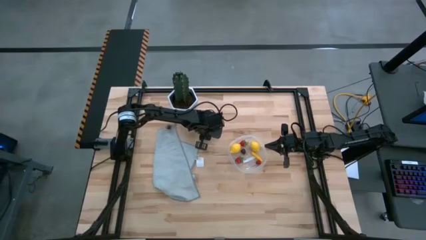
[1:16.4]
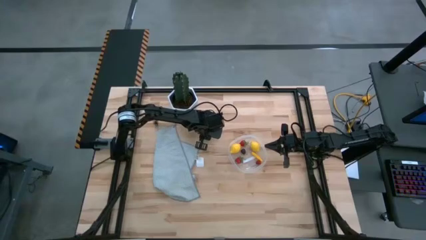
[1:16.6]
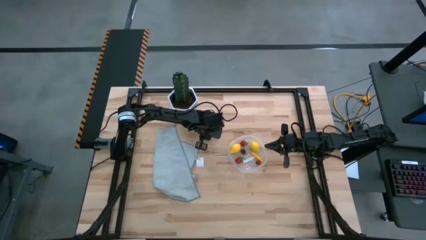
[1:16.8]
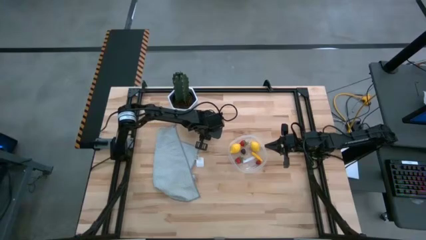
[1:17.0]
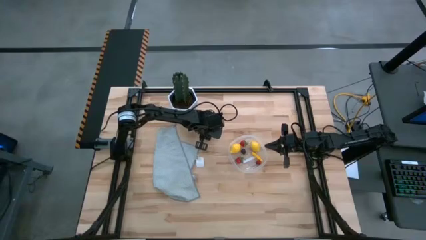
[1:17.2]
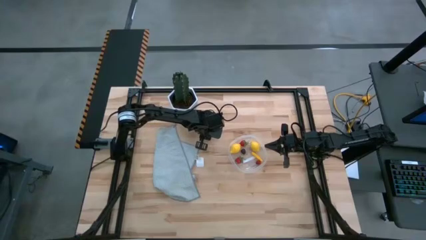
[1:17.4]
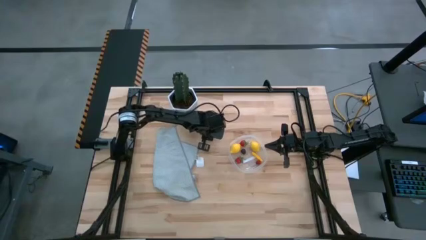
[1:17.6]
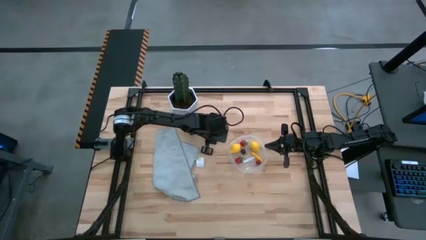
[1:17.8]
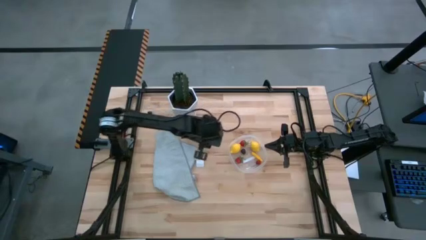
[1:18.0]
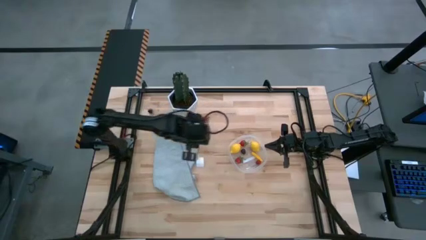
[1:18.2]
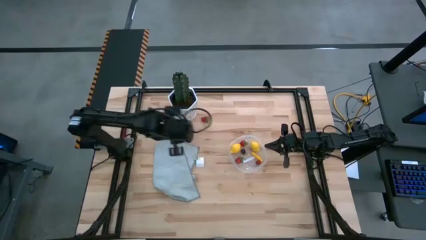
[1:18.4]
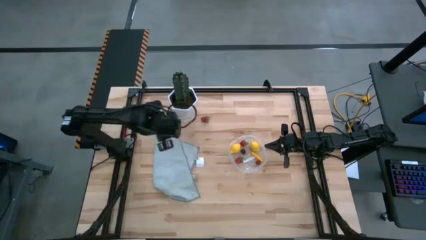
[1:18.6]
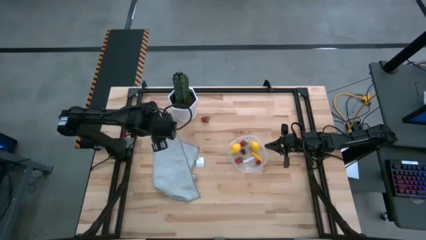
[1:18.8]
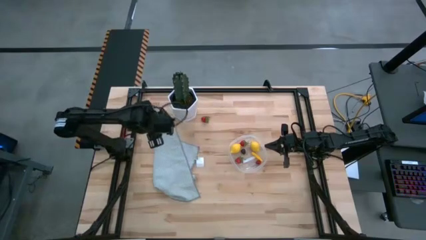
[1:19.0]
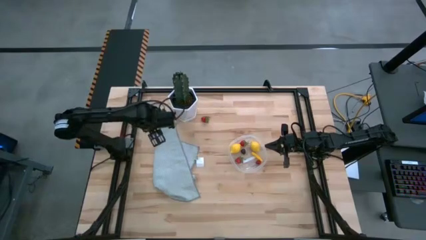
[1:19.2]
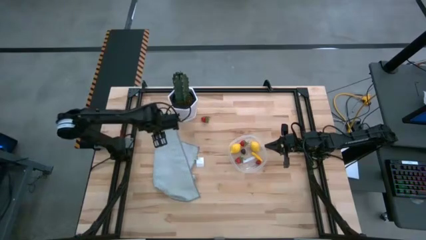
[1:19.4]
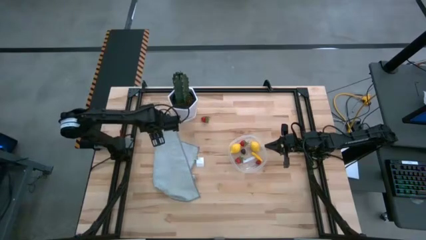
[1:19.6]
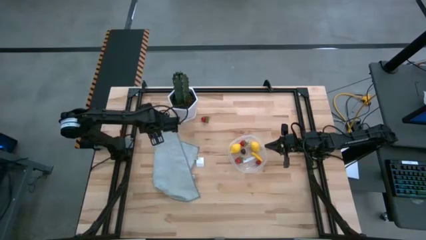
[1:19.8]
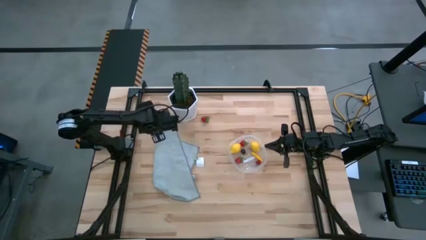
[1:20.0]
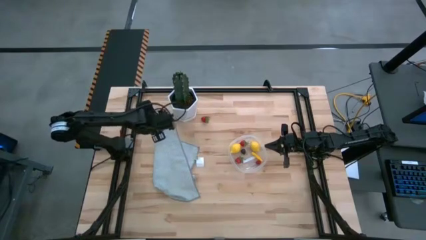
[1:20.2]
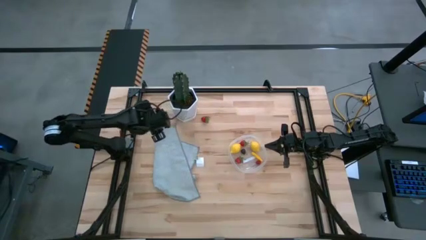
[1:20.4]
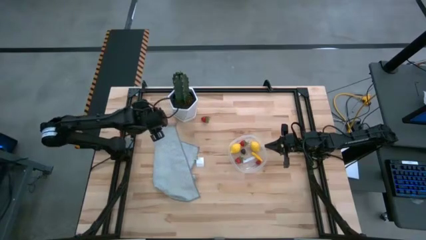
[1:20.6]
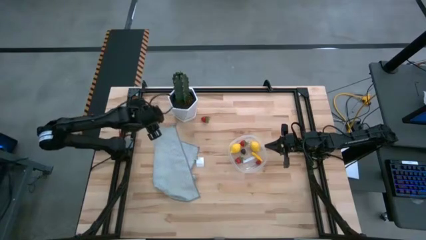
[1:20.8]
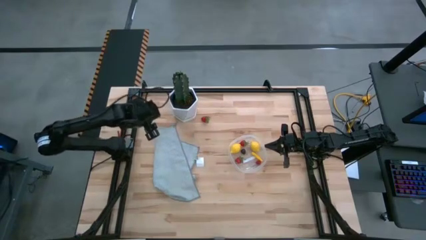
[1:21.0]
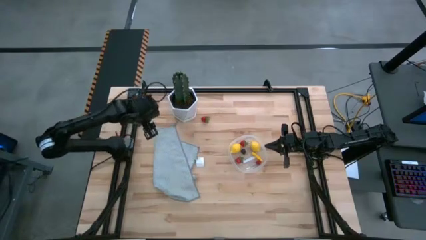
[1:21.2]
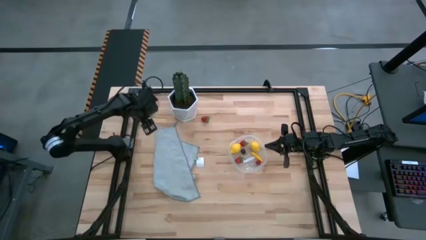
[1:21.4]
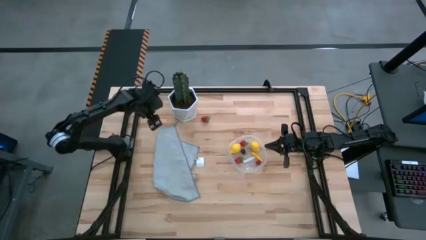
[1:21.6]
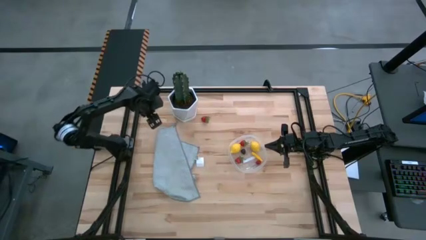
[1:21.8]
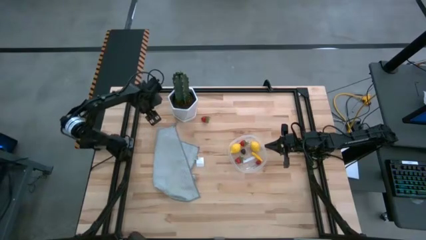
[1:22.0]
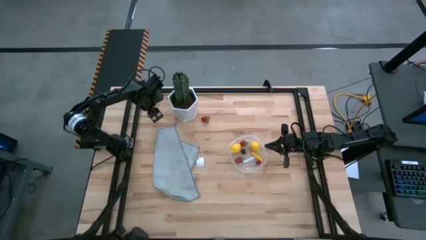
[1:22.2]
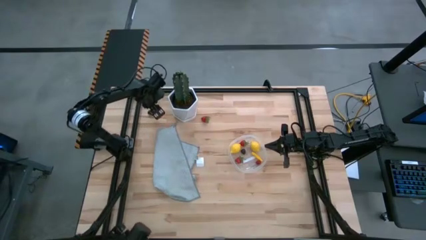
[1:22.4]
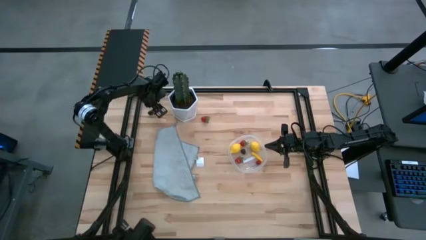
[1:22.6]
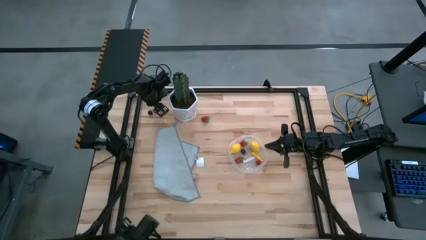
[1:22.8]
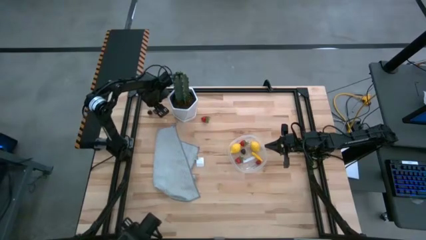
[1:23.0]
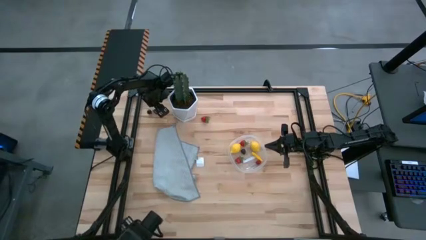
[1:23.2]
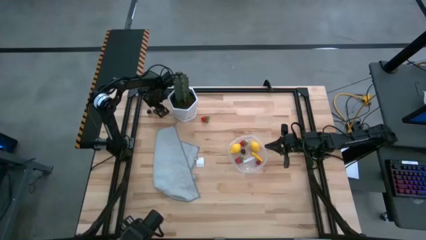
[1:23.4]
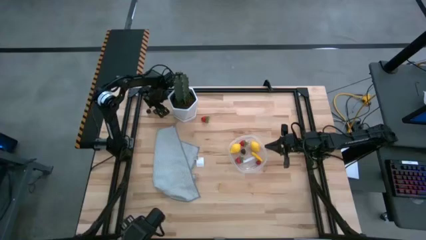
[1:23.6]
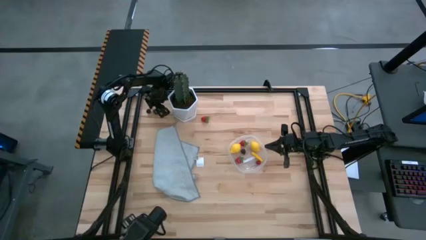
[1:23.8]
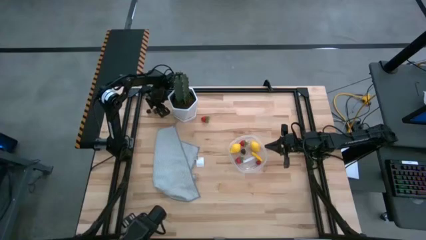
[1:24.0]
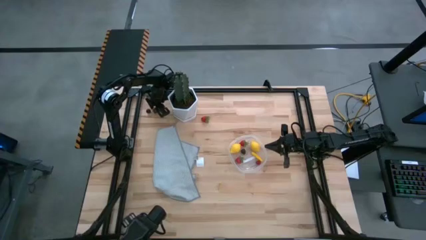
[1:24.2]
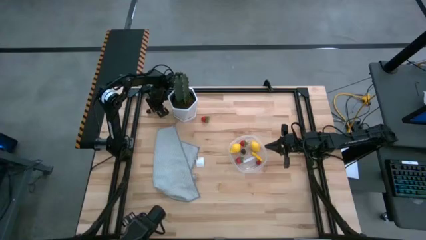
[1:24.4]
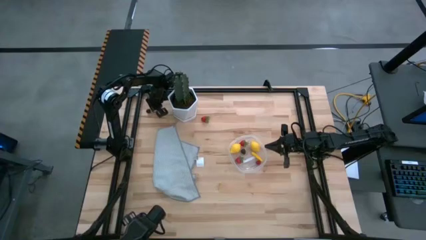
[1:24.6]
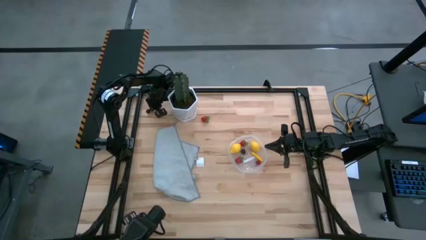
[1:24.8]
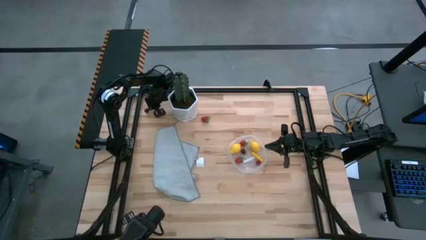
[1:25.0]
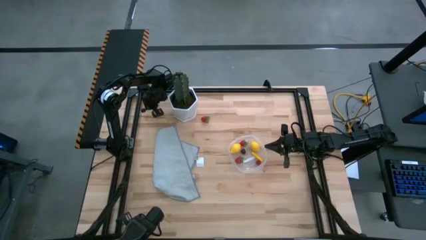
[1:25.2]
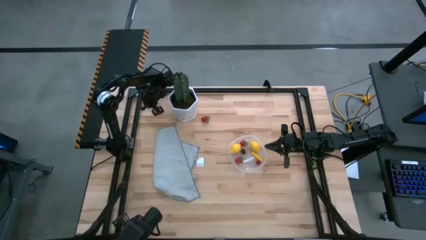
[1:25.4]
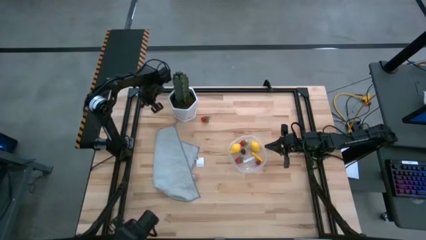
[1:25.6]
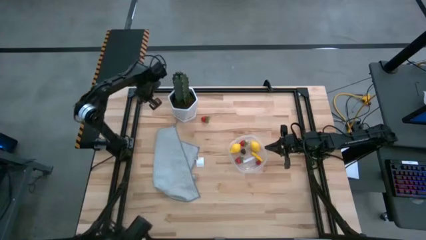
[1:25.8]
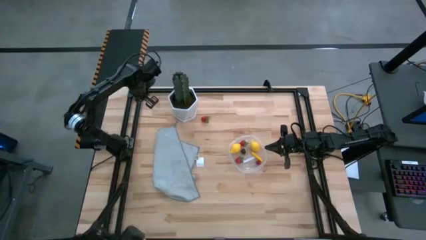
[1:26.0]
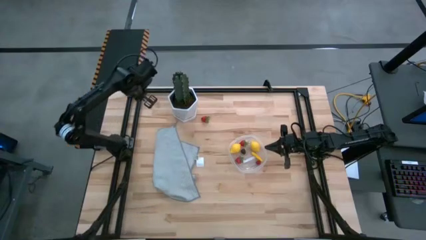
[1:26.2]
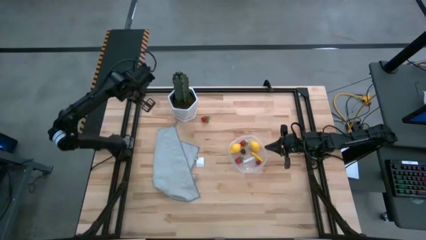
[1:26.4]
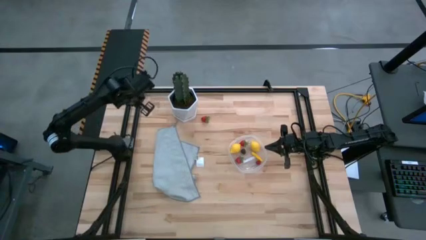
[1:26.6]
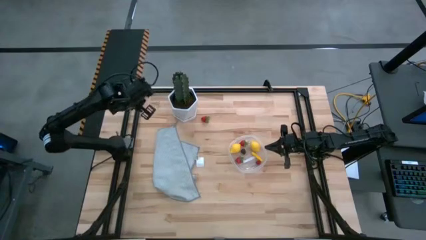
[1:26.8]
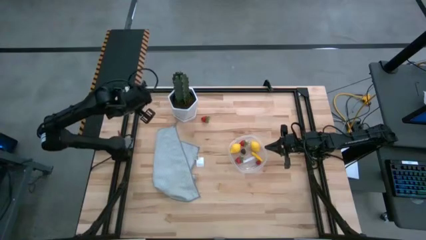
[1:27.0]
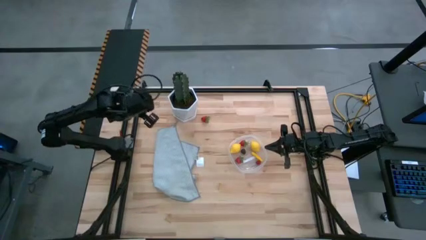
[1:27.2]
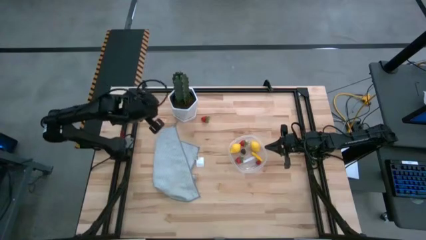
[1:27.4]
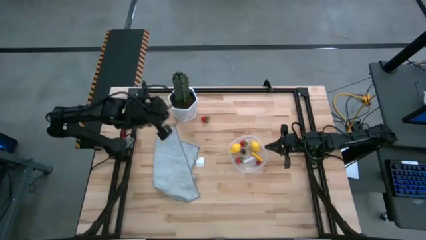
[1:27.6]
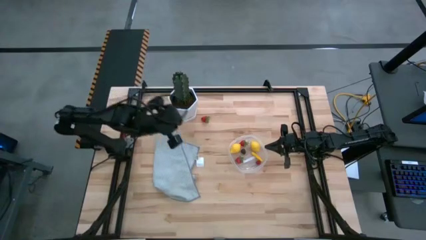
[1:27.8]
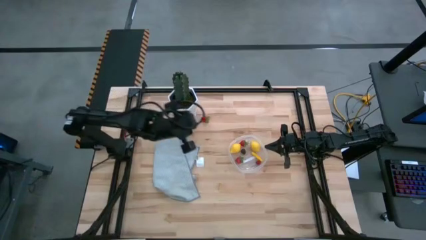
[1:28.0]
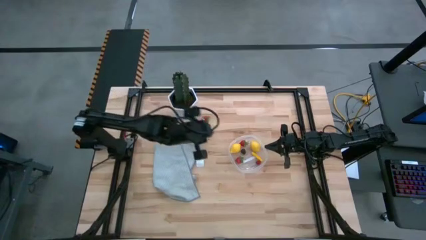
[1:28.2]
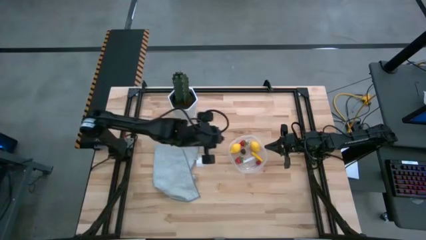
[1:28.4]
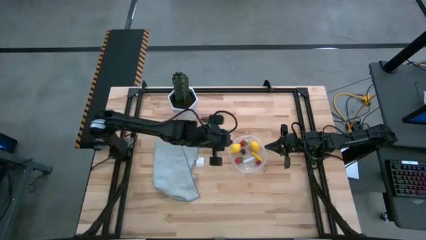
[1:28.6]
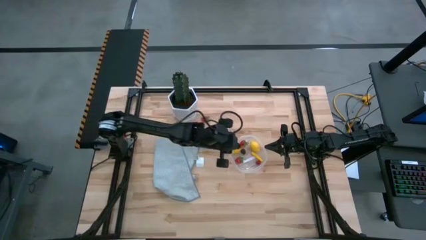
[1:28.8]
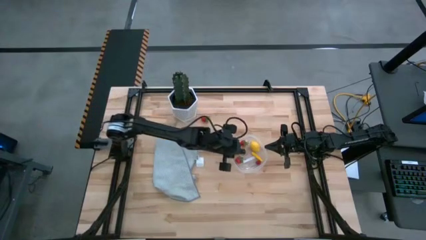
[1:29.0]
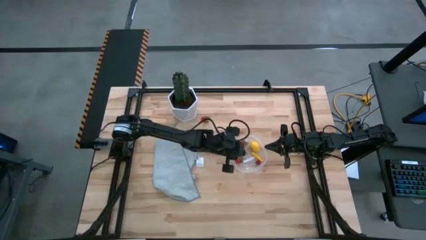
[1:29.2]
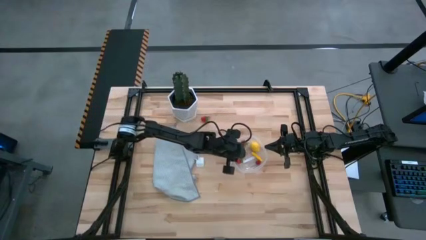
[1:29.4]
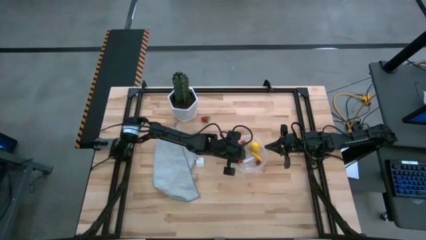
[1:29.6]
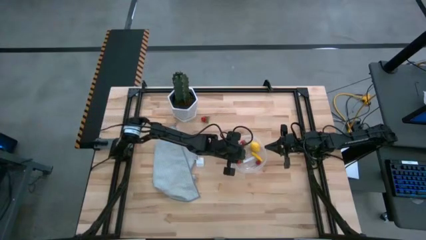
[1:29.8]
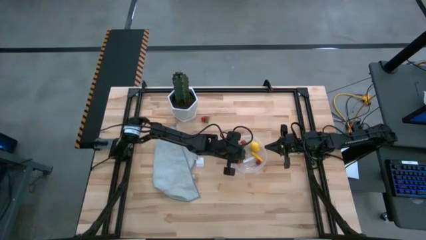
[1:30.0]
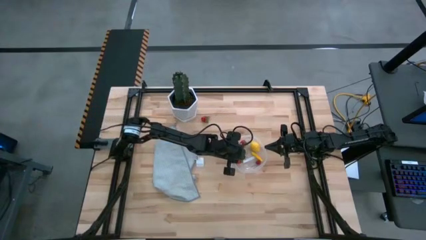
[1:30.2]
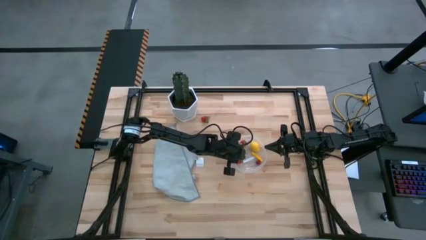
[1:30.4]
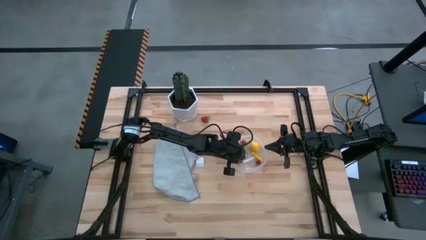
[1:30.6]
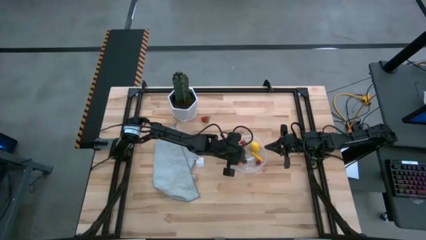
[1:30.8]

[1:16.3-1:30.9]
Task: Pick and placing Produce into tupperware
Put the black cherry into the transparent container

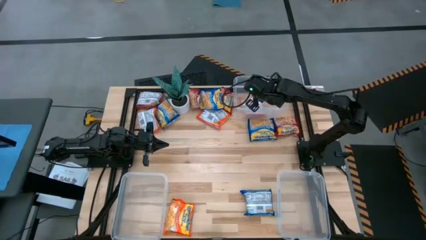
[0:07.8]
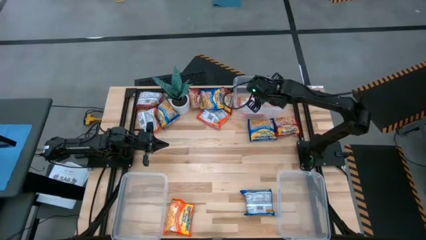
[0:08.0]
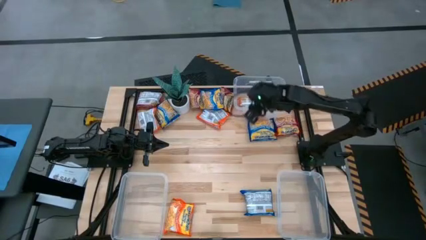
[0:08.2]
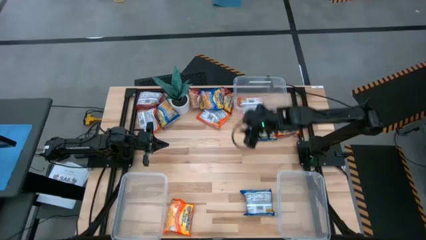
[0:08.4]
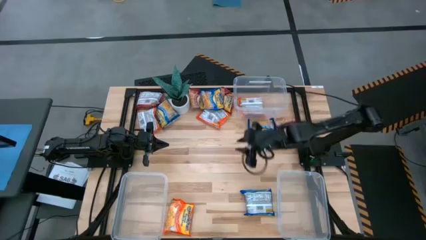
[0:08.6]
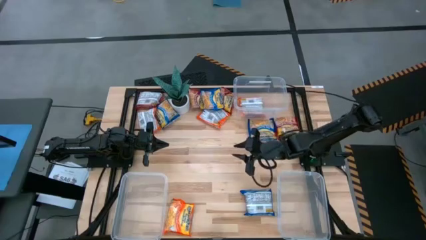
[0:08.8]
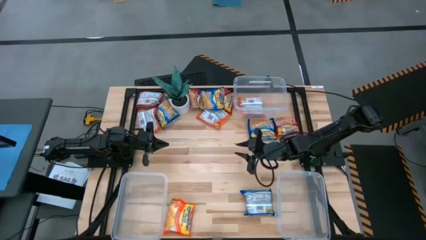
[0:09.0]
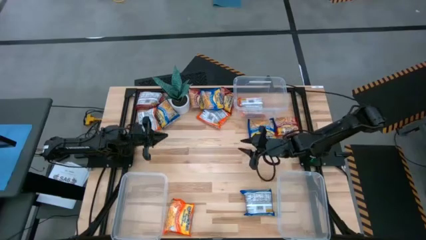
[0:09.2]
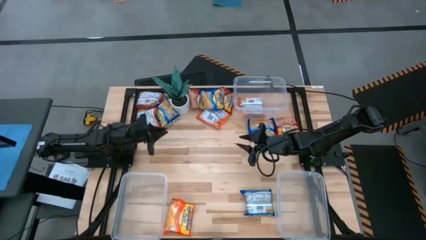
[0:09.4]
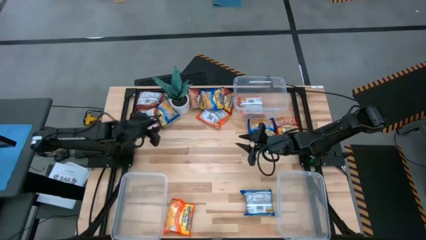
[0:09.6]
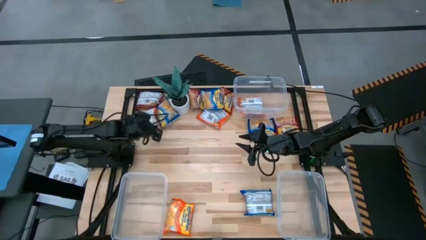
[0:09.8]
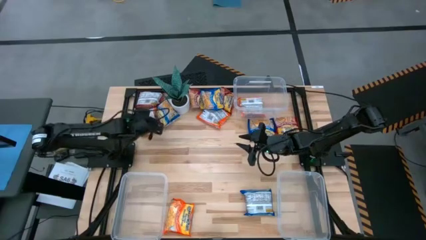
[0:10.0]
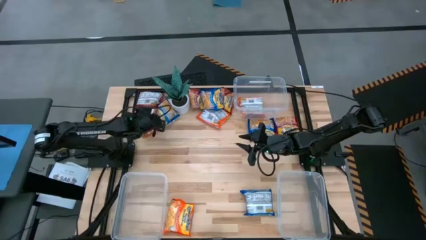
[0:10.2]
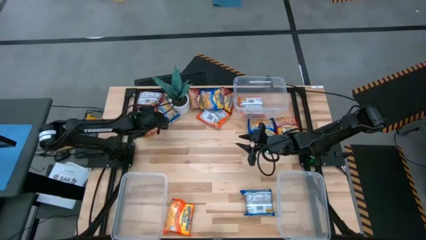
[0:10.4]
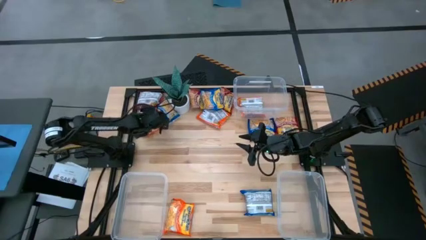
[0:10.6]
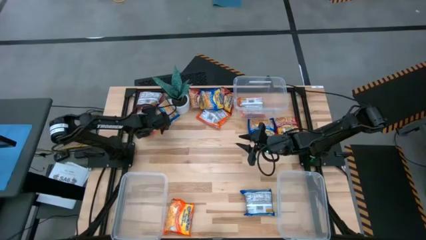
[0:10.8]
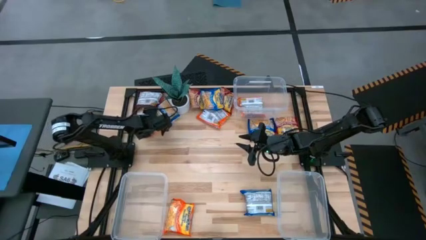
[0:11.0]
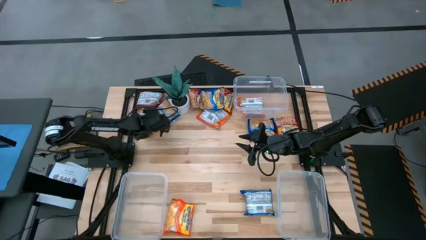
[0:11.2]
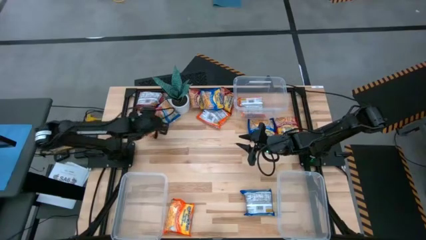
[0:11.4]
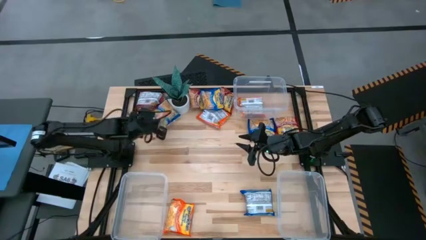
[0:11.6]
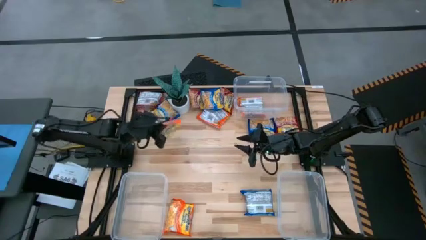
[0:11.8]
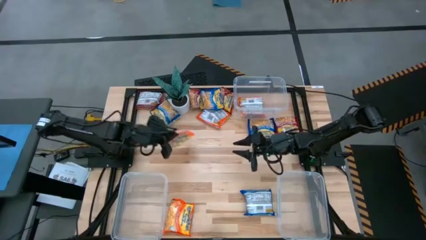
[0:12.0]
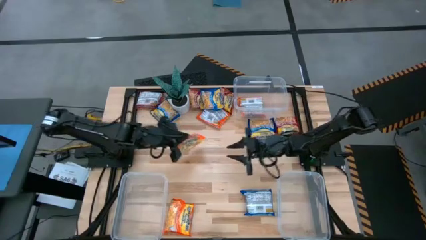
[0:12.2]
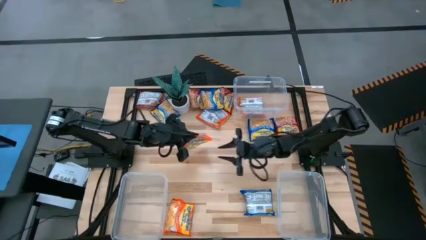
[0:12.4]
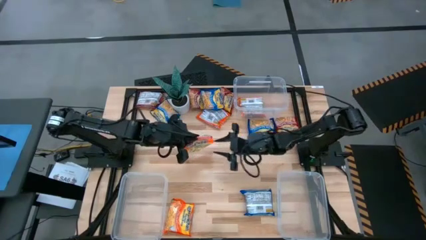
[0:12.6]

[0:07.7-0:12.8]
Task: Sort Maruchan noodles
Put the orange noodle pack into the top transparent bin
